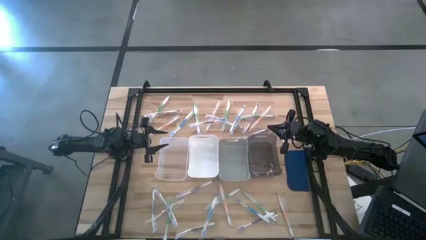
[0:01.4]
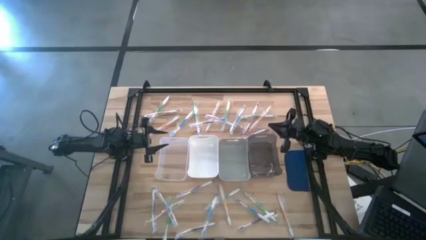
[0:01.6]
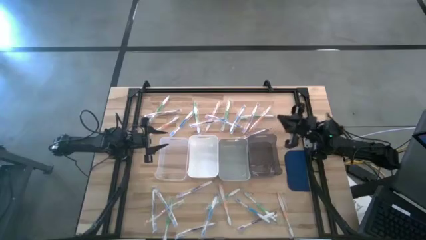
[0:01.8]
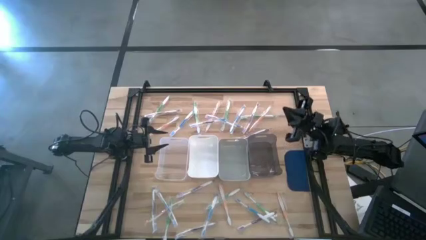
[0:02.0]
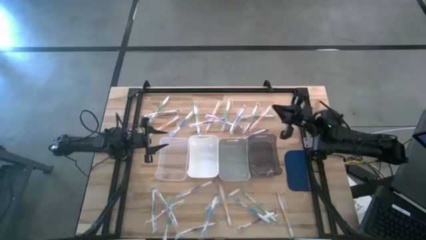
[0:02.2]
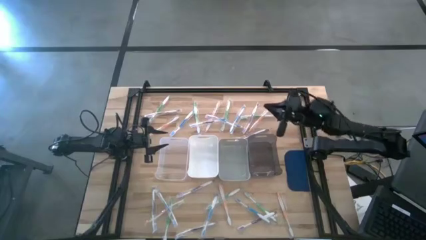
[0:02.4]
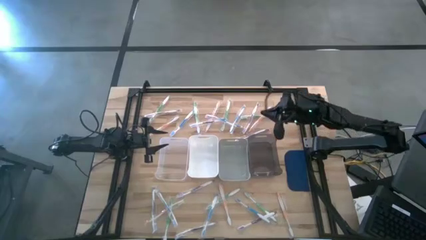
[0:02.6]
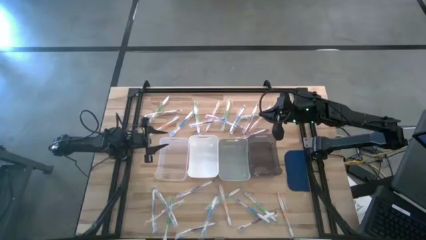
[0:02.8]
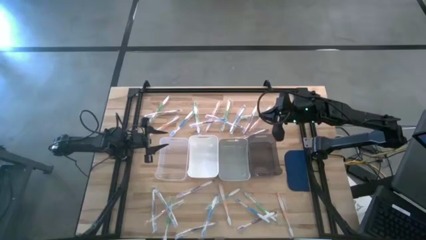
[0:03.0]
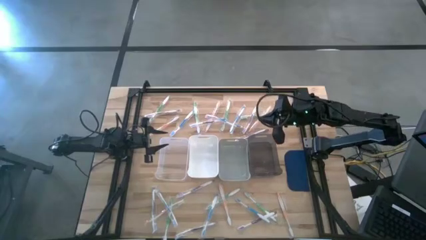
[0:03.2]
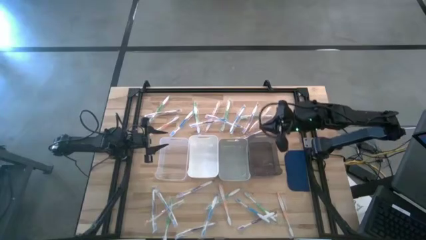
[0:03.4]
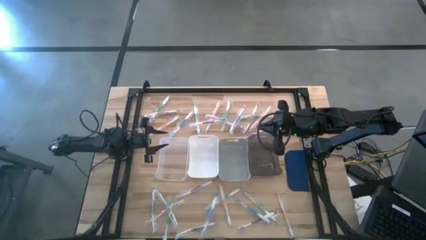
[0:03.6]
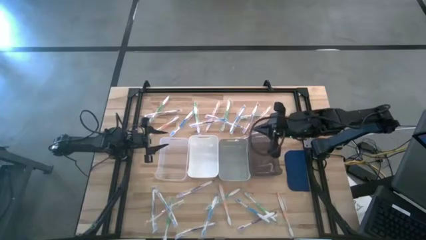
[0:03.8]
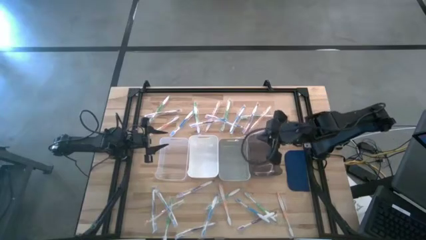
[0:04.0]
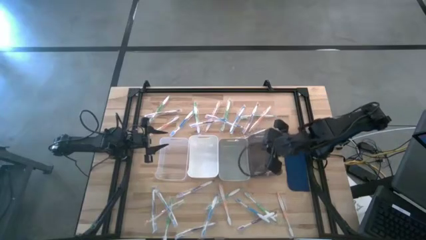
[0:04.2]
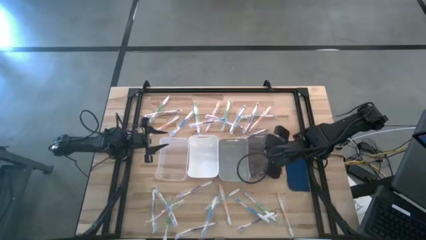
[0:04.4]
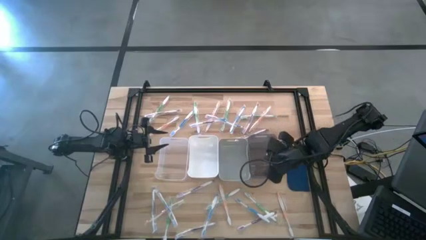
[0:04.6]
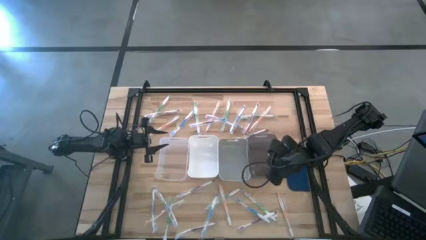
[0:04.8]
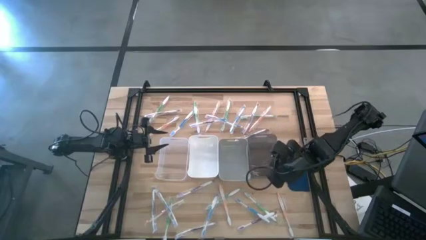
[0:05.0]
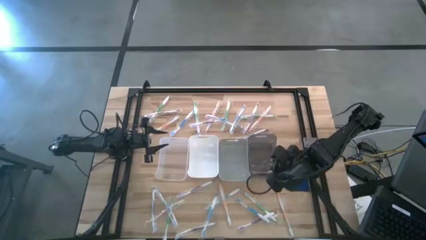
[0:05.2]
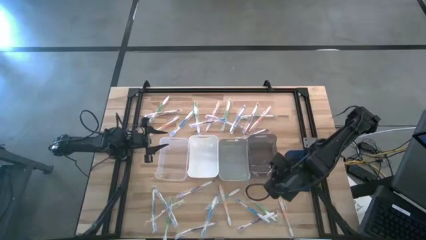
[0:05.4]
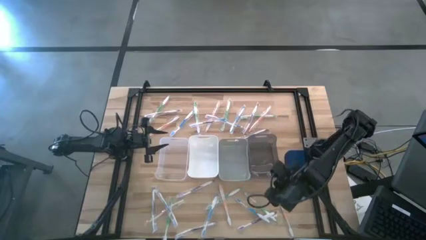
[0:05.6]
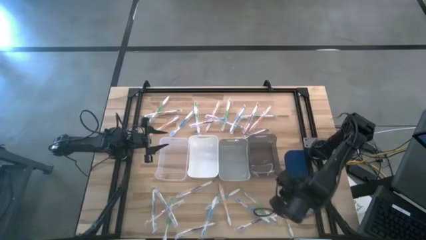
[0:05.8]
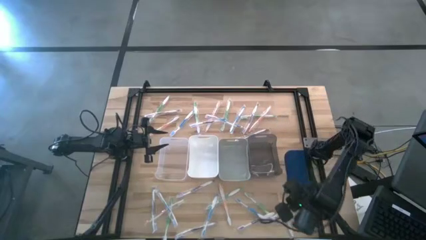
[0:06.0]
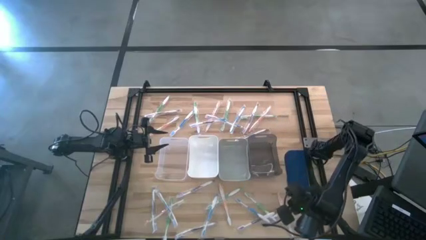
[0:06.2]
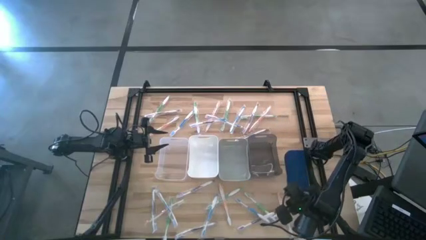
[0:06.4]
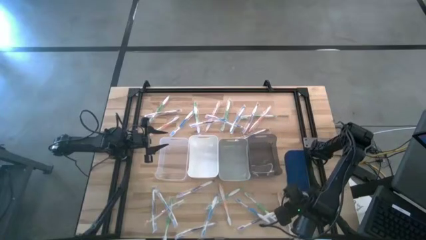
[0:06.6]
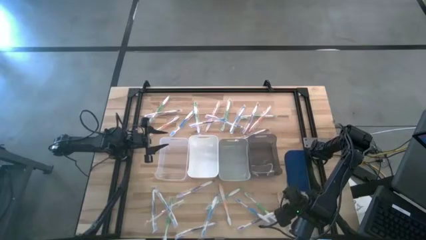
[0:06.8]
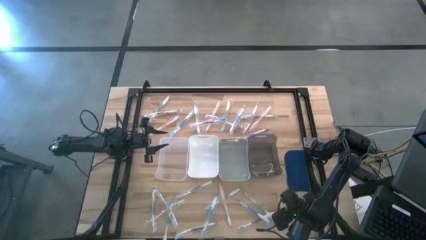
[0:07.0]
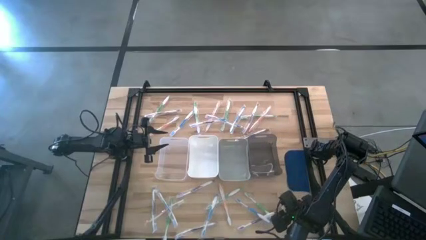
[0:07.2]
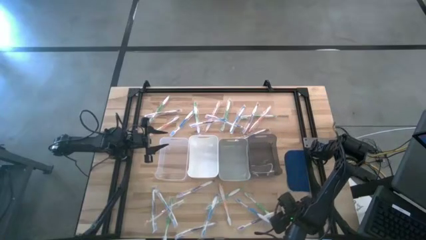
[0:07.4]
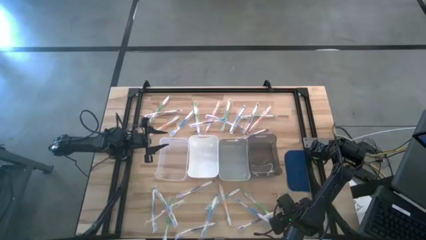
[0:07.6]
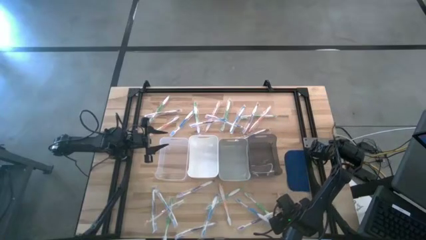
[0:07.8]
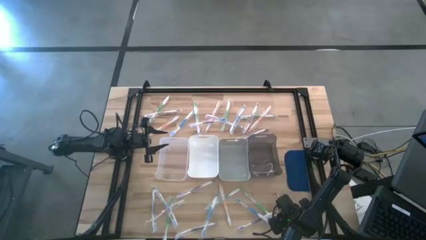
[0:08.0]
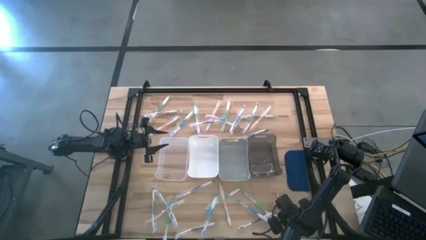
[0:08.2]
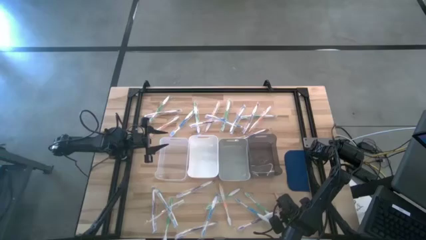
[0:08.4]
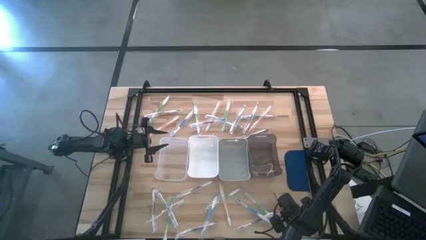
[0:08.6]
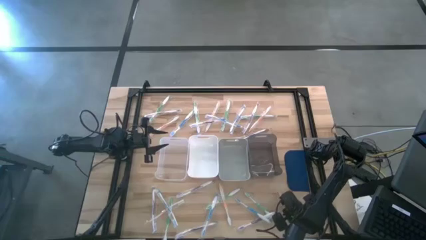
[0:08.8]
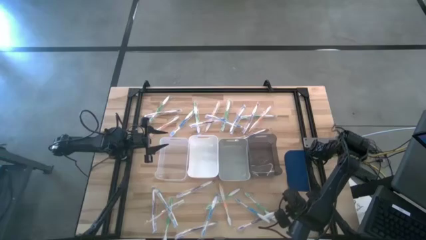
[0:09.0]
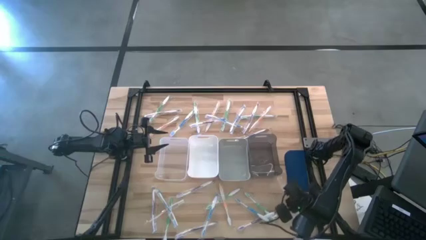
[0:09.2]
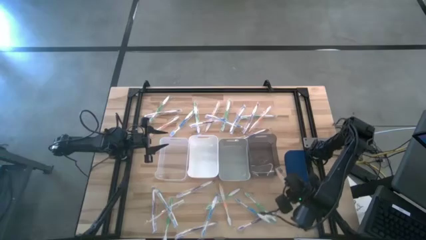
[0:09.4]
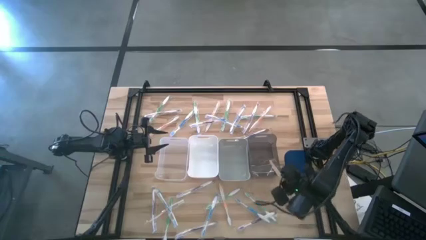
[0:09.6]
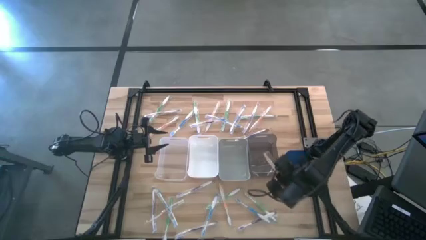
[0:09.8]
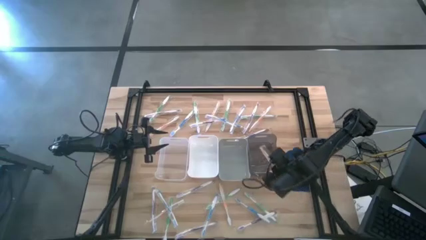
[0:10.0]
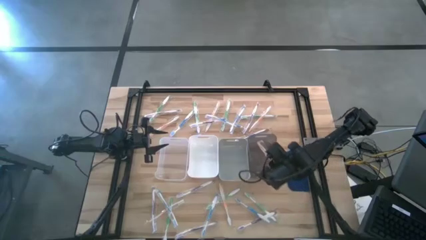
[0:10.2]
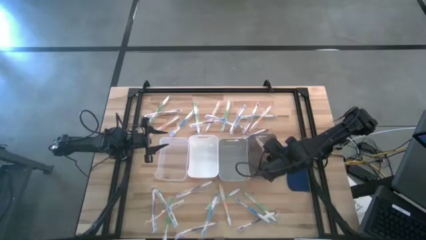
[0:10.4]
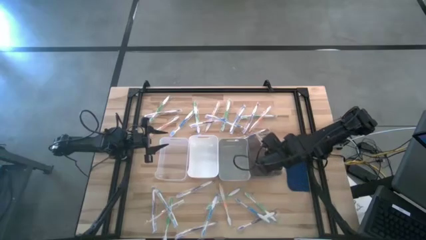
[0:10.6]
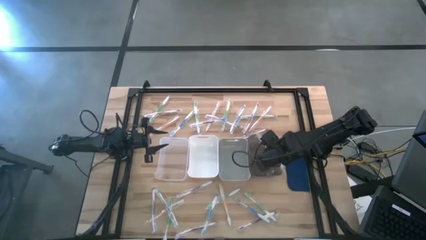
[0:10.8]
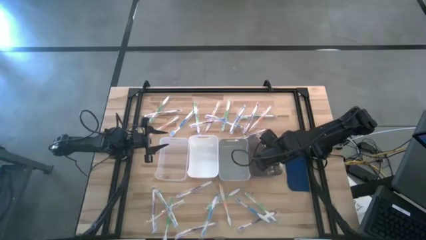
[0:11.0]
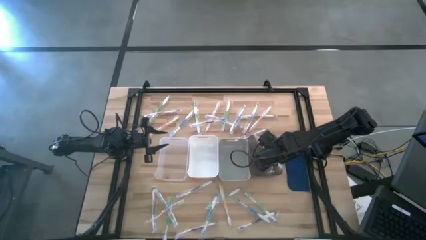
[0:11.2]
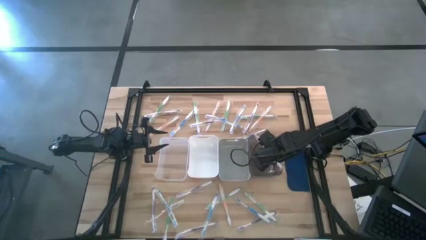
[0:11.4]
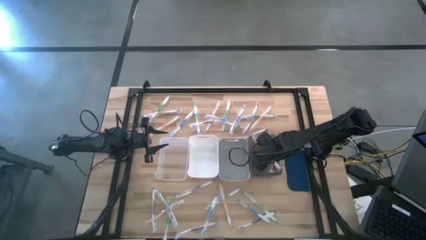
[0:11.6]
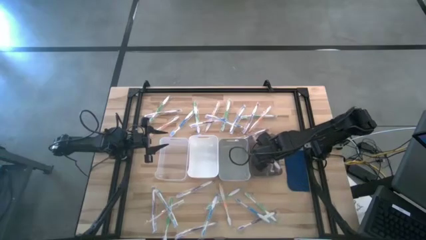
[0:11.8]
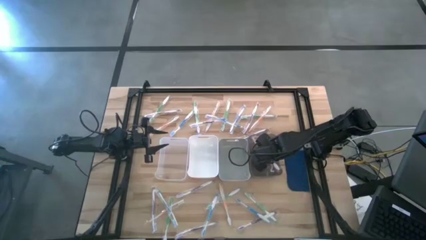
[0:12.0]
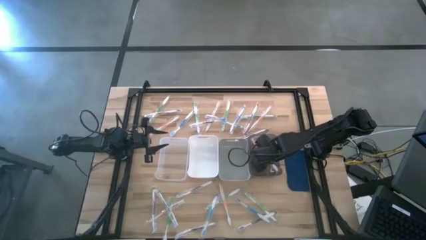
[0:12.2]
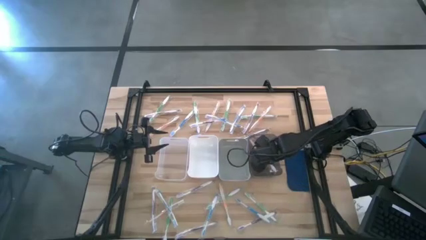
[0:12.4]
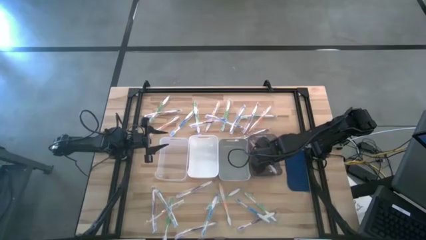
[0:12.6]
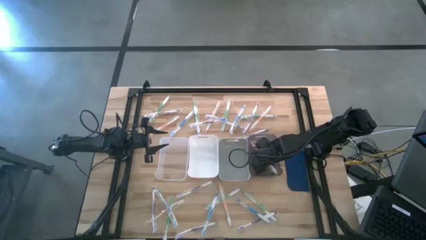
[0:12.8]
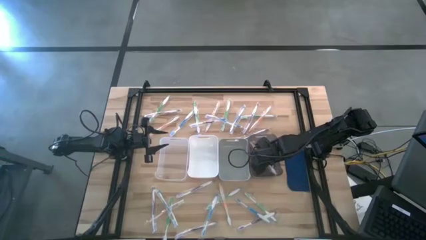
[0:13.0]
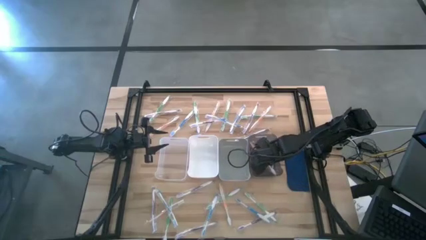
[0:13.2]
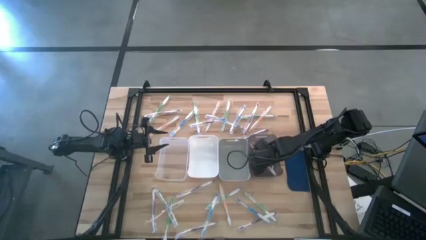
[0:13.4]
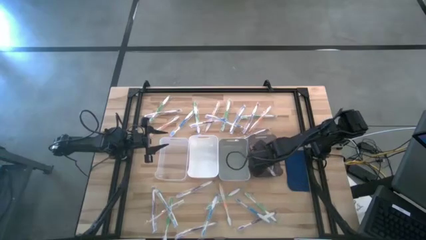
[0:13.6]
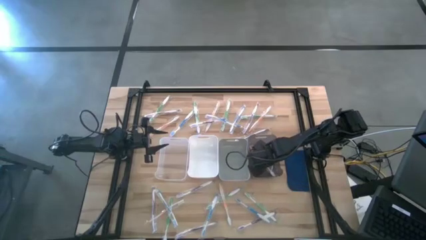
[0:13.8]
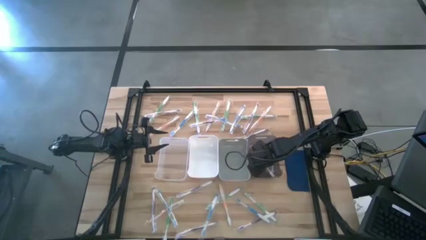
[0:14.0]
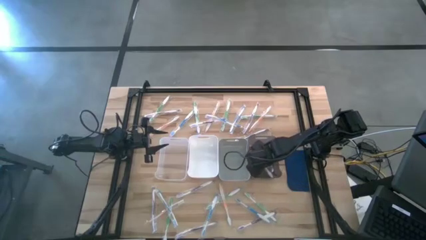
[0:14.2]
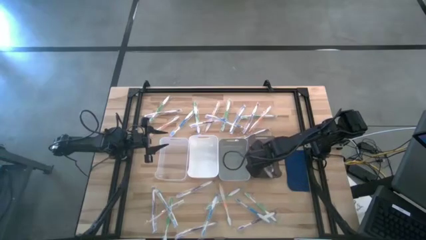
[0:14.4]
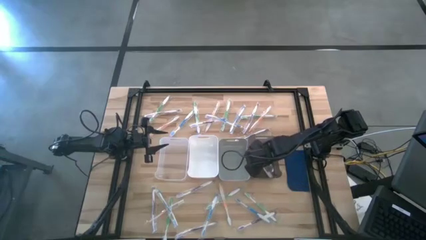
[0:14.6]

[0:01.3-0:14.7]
Task: Pick & Place Toothbrushes
Put the orange toothbrush into the black bin
